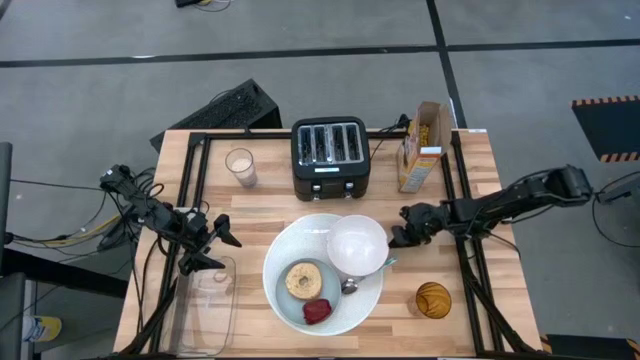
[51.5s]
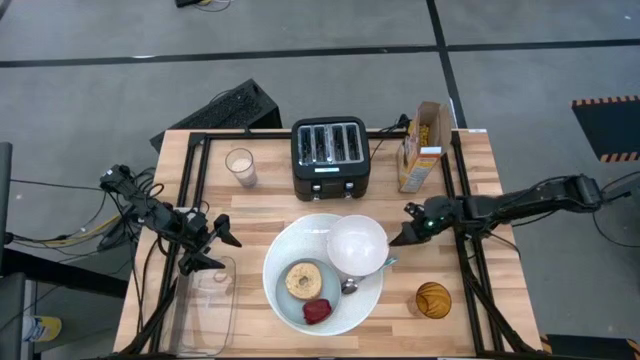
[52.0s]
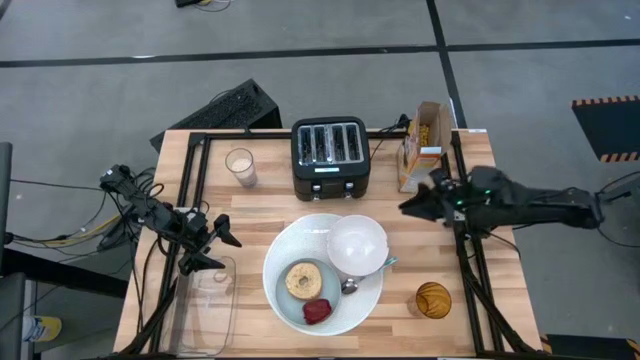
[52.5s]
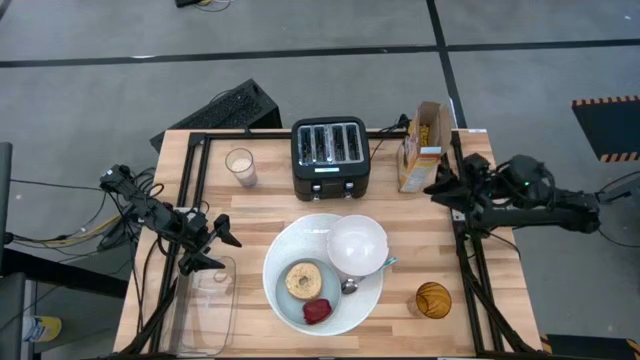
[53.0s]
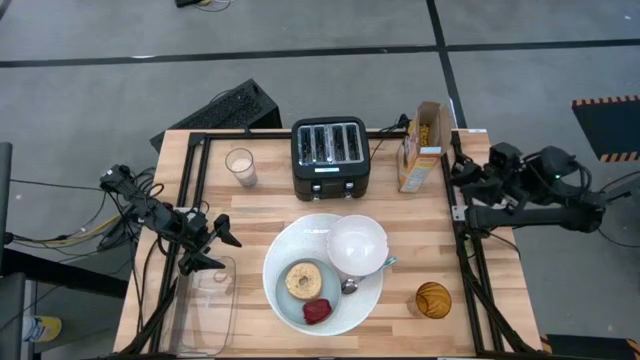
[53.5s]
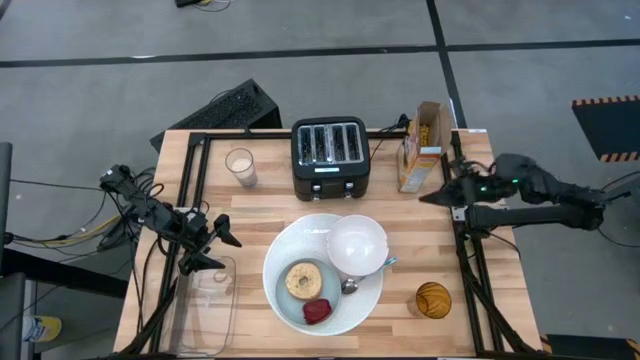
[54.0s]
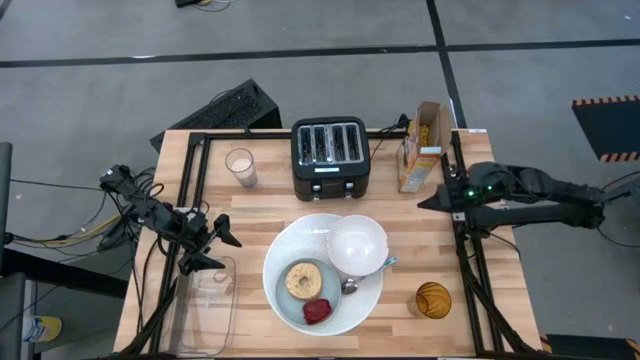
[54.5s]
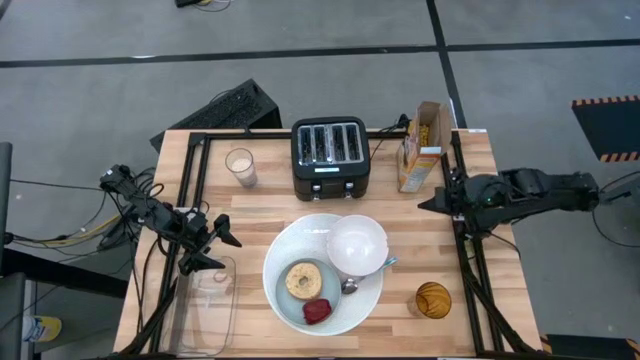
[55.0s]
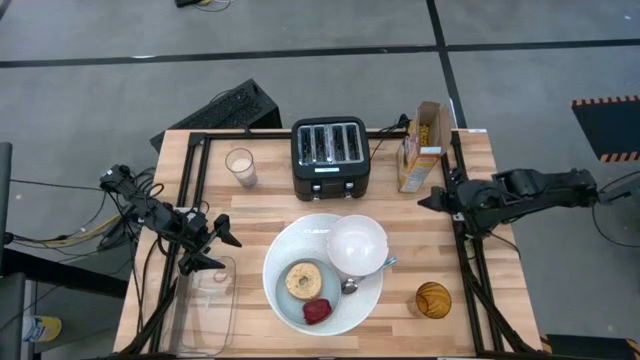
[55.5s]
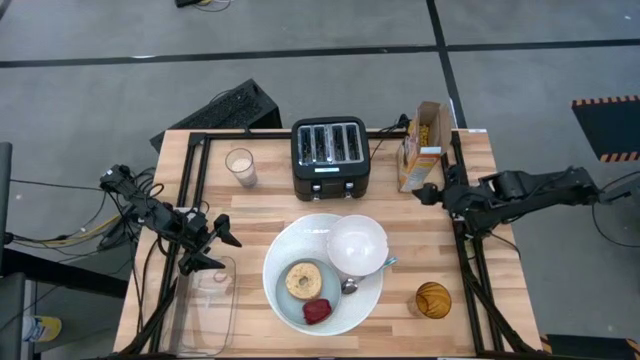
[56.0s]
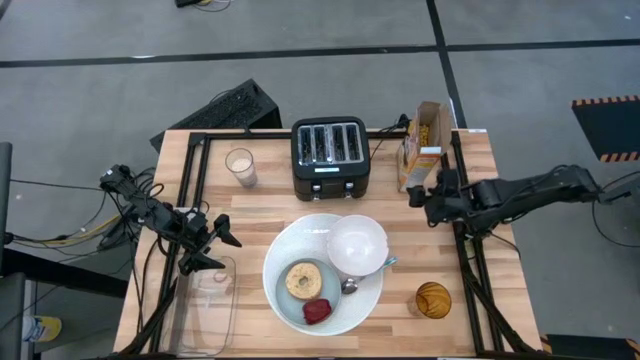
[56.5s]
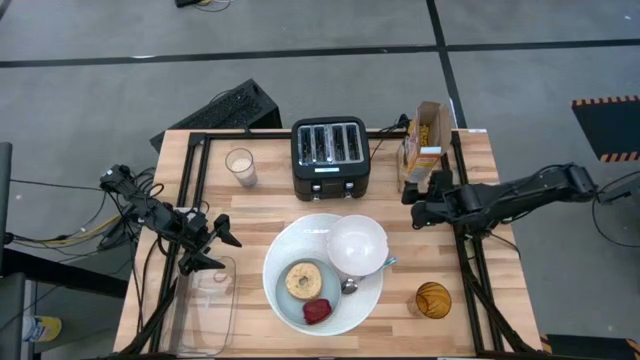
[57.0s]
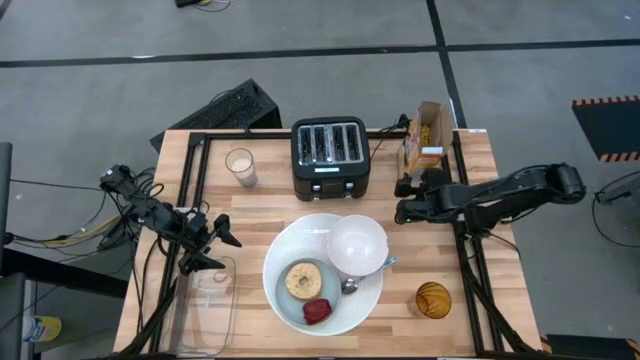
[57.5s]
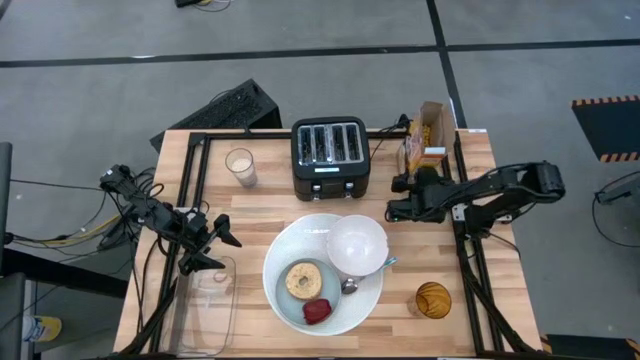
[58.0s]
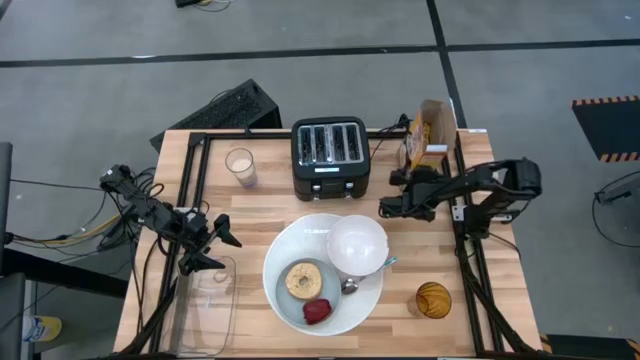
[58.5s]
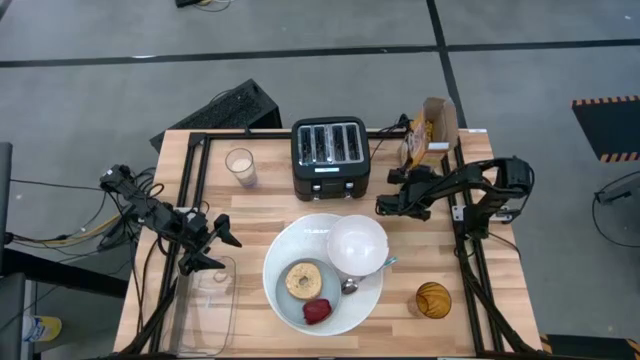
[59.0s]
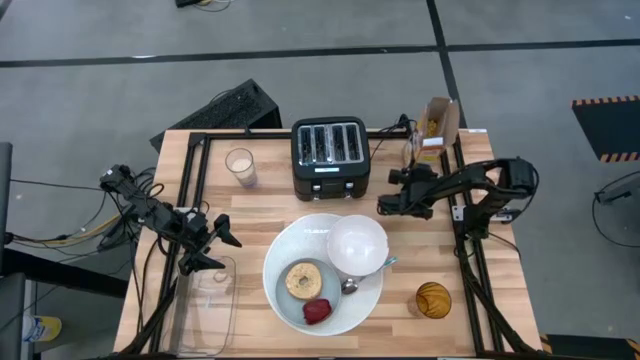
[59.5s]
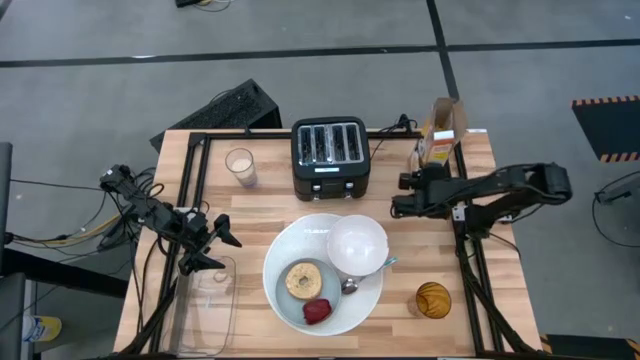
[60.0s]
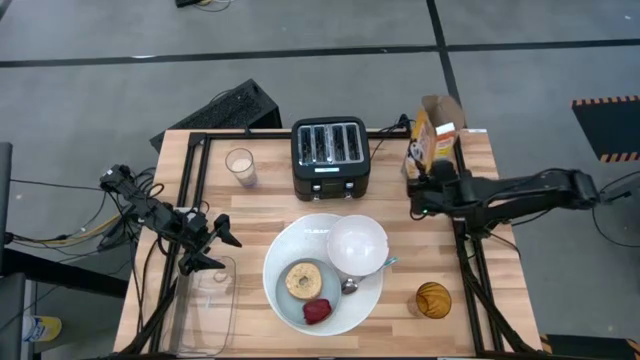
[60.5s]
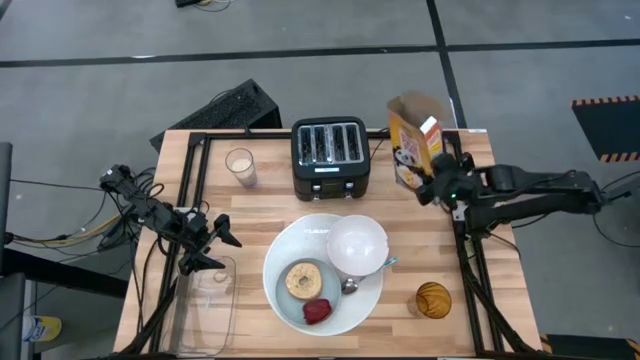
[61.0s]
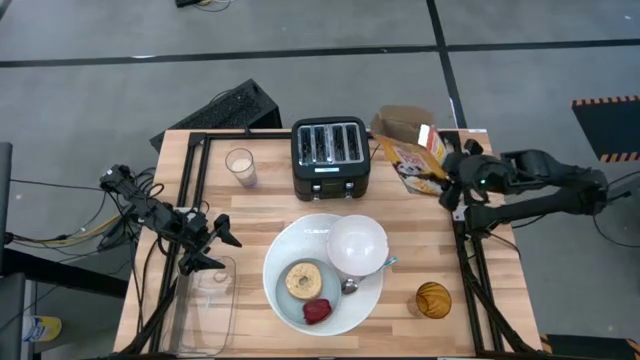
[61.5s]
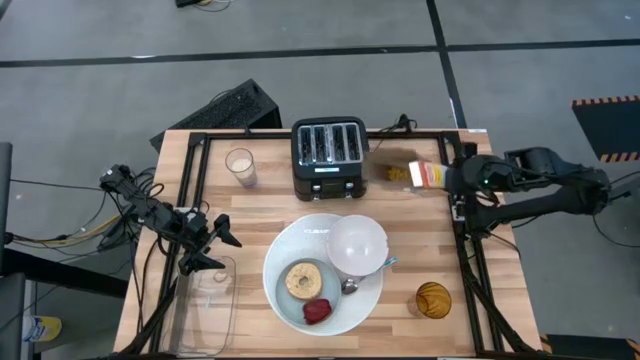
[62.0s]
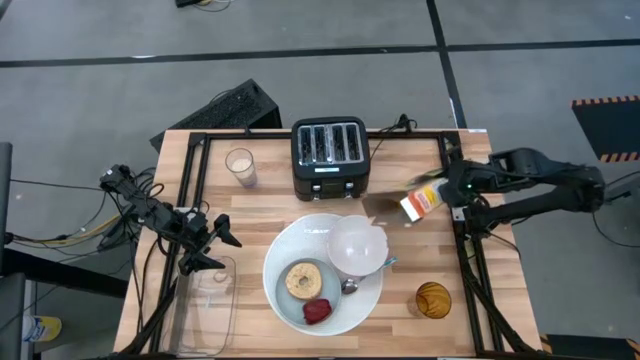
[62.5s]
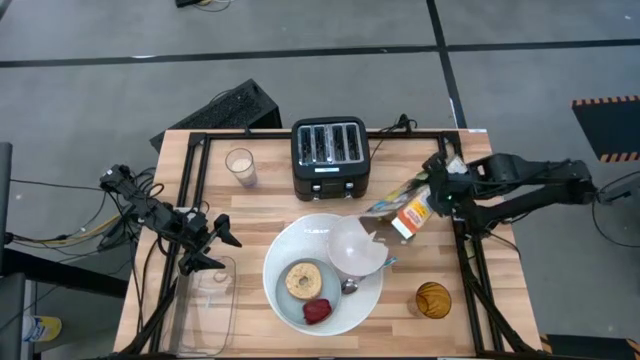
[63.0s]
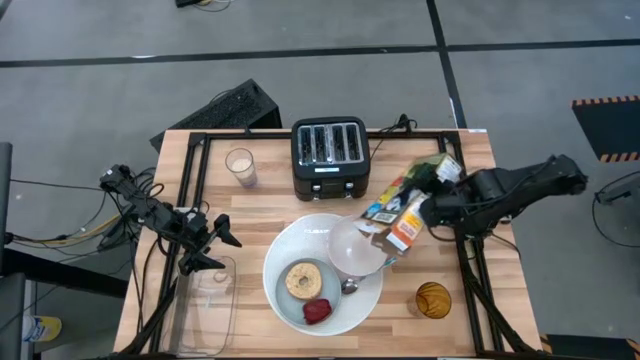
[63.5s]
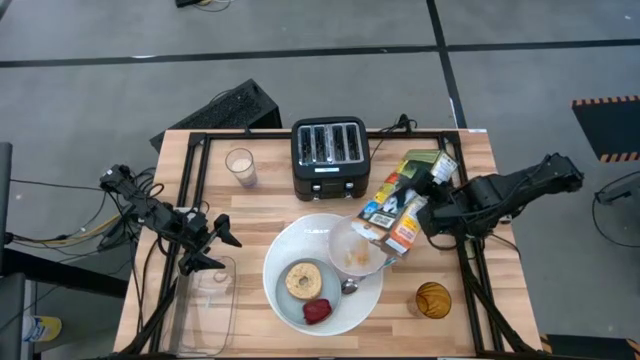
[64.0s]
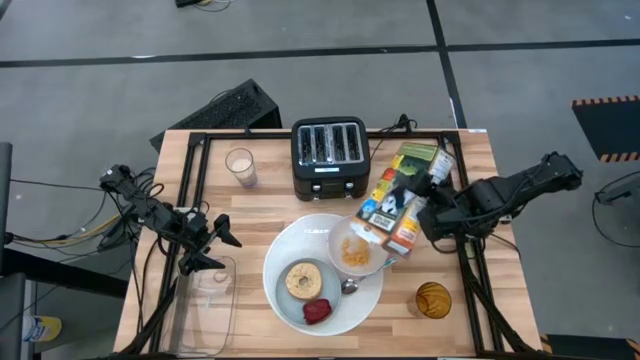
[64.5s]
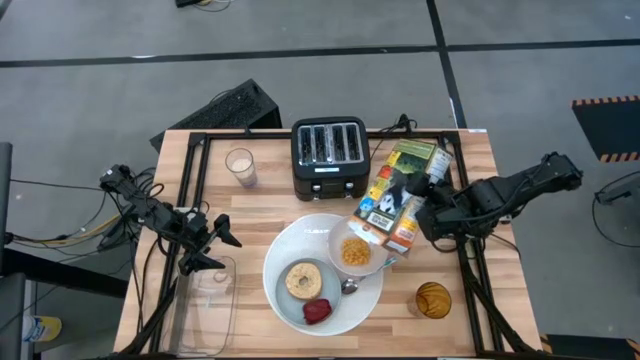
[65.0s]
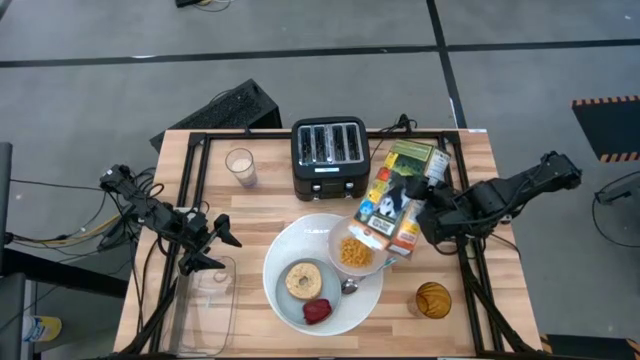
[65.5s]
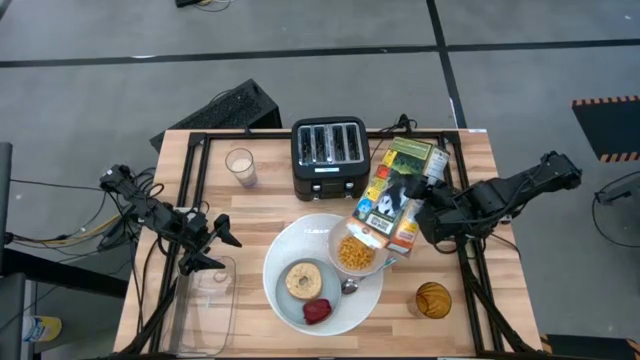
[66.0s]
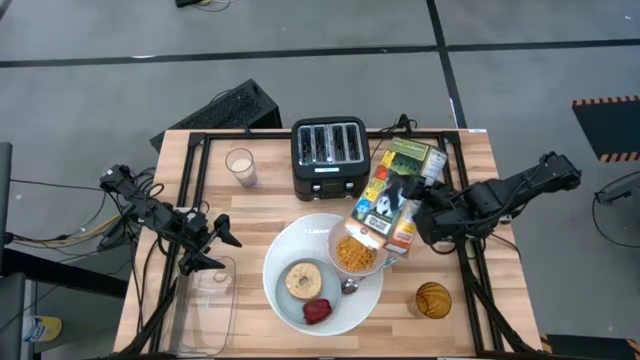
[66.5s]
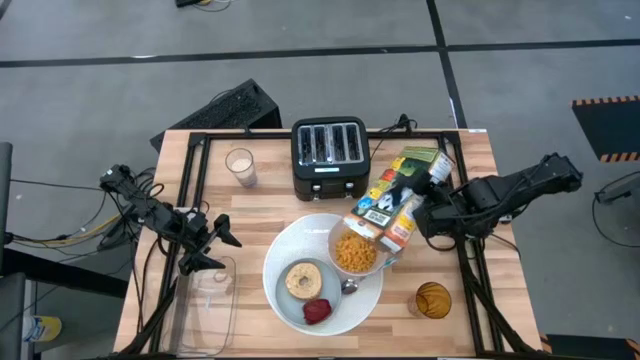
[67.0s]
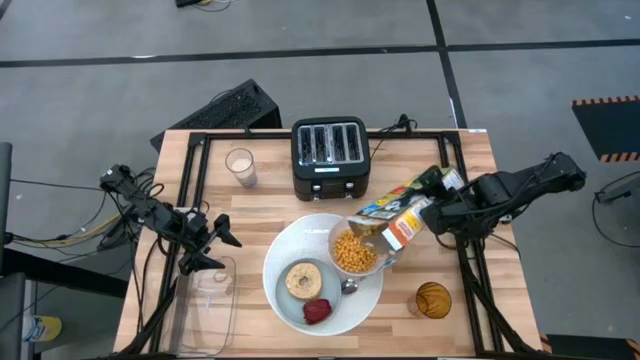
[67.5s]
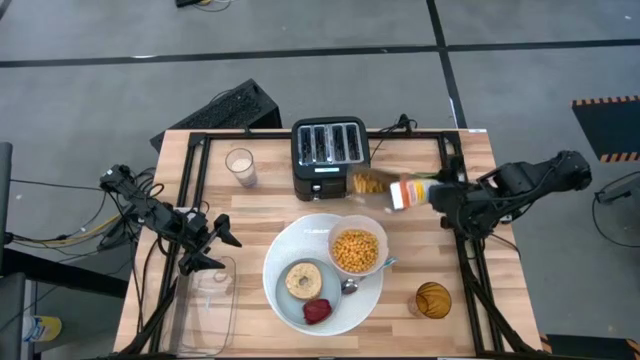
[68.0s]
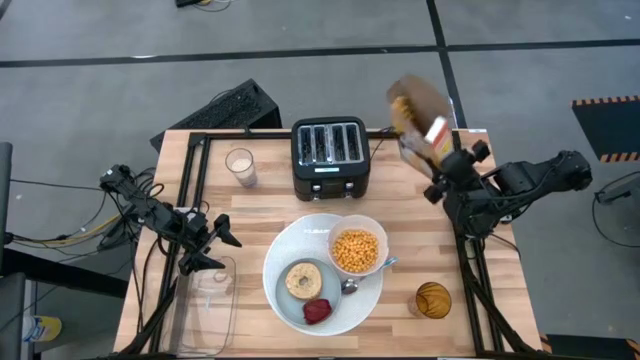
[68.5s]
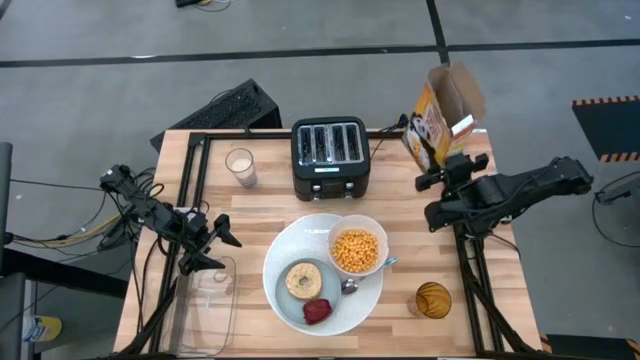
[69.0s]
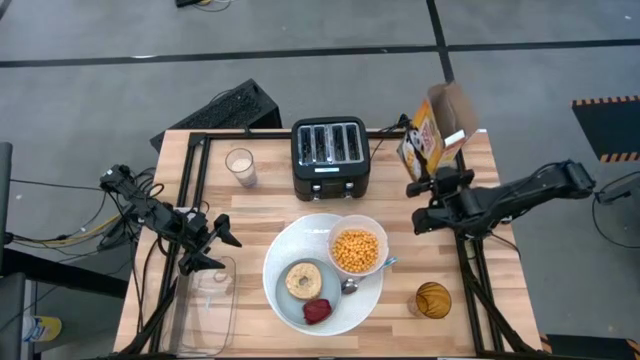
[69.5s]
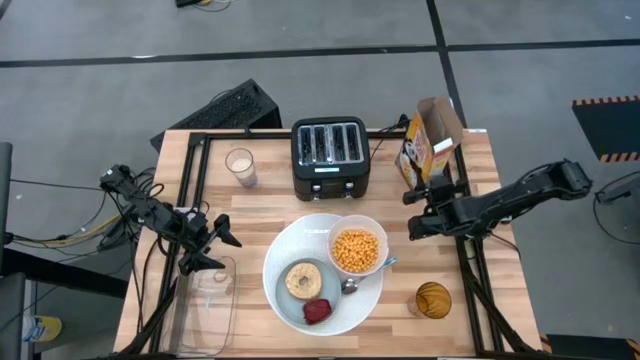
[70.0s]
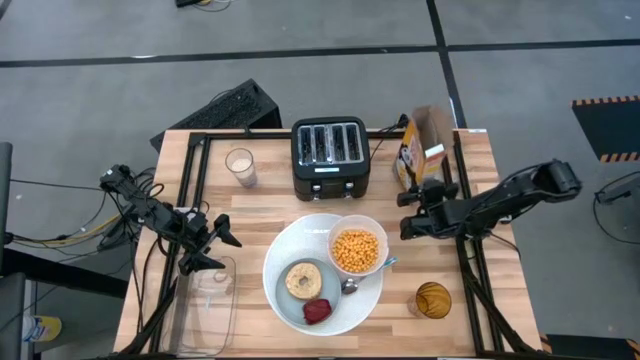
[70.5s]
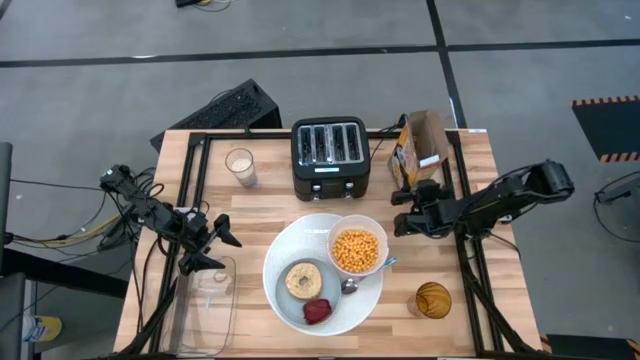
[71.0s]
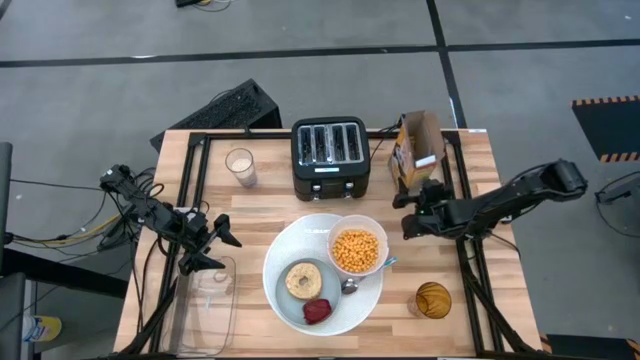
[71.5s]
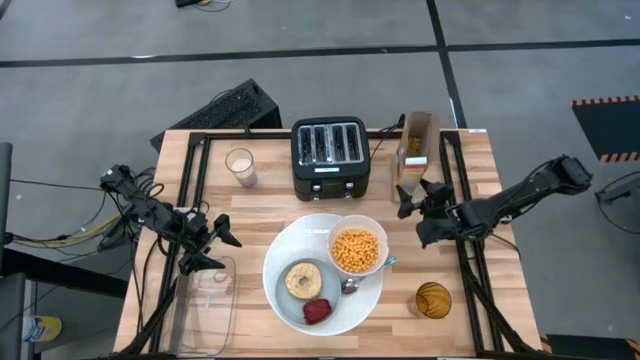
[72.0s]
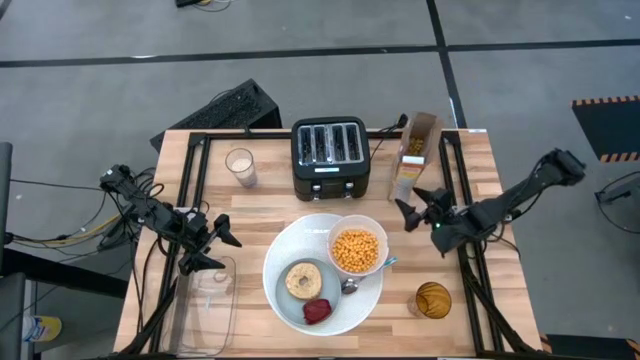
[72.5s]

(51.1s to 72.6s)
Task: Arrange a breakfast setting
Pour the cereal from the cereal box into the white bowl
